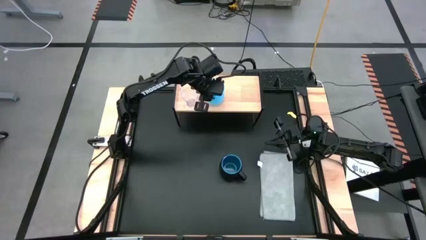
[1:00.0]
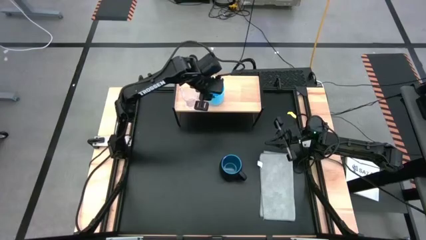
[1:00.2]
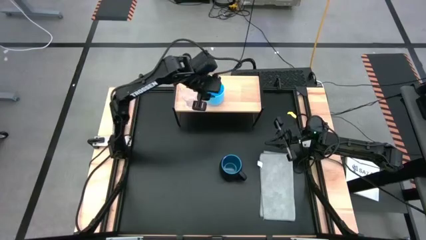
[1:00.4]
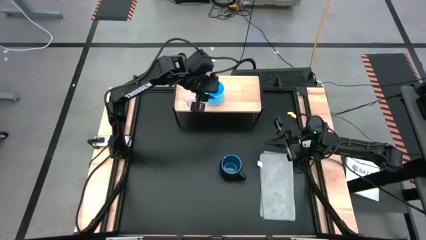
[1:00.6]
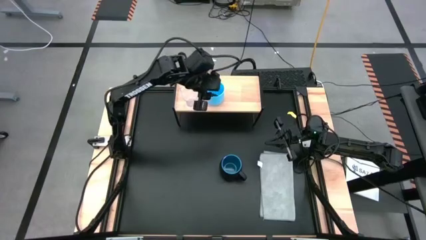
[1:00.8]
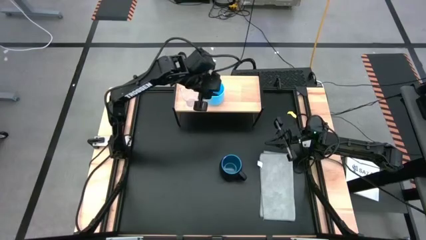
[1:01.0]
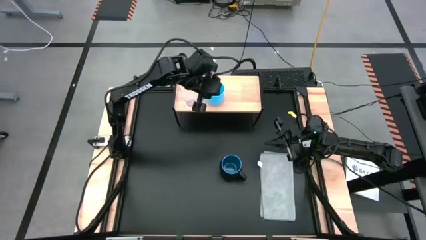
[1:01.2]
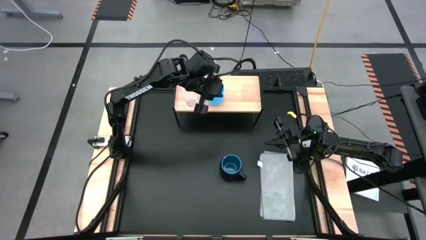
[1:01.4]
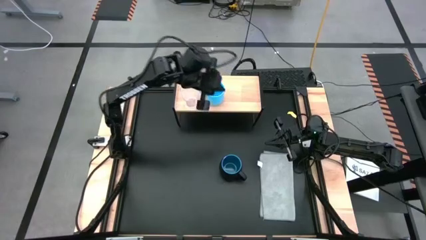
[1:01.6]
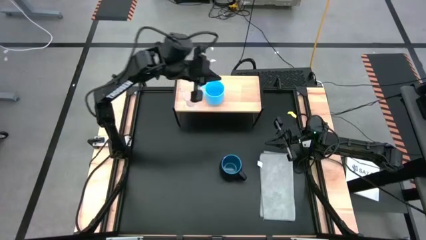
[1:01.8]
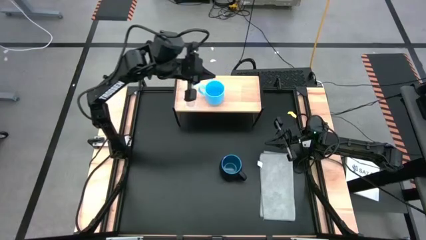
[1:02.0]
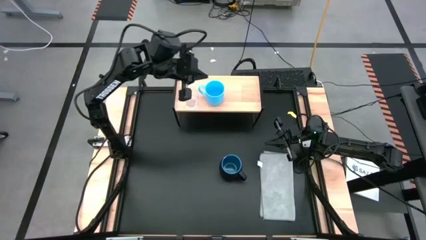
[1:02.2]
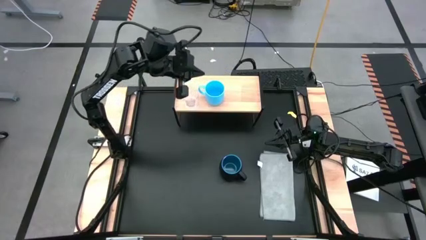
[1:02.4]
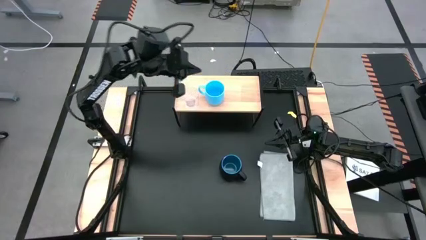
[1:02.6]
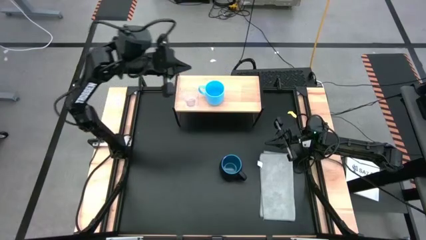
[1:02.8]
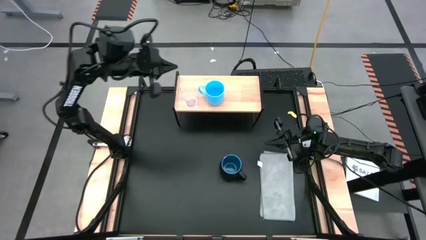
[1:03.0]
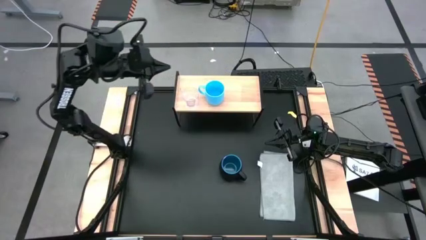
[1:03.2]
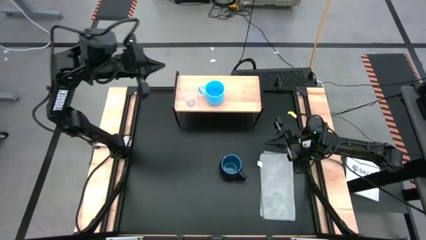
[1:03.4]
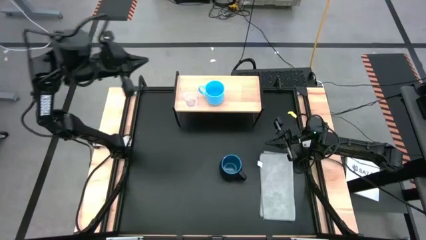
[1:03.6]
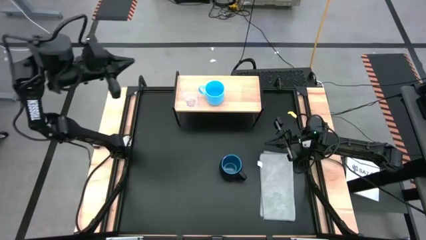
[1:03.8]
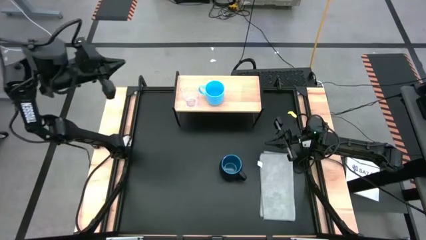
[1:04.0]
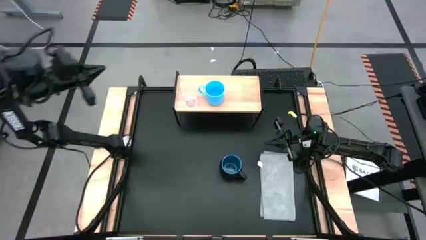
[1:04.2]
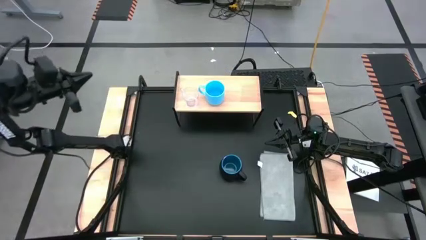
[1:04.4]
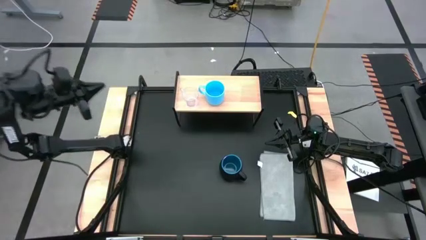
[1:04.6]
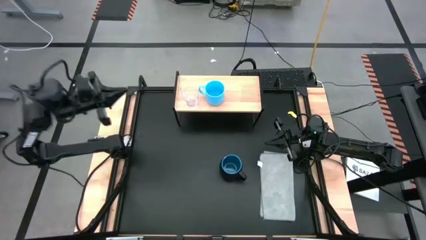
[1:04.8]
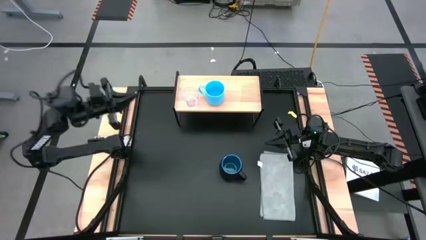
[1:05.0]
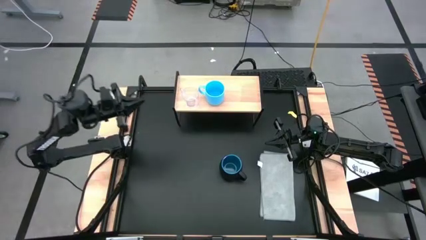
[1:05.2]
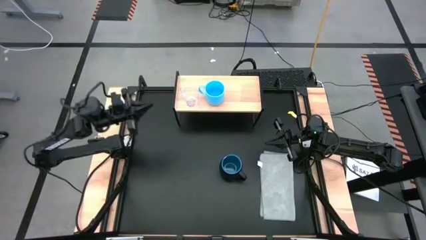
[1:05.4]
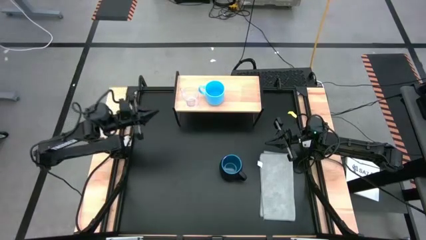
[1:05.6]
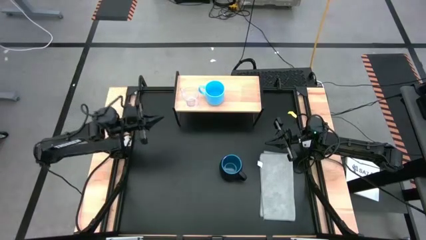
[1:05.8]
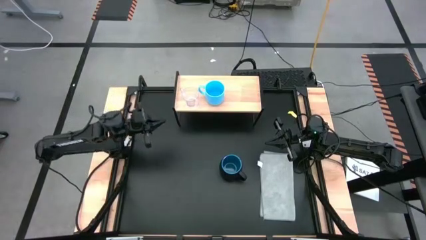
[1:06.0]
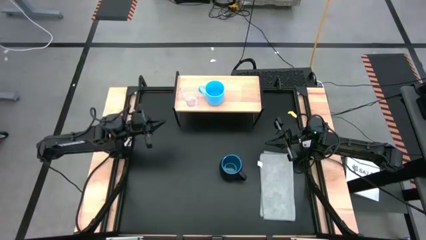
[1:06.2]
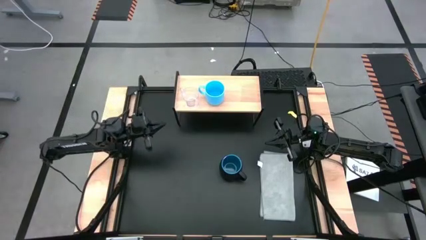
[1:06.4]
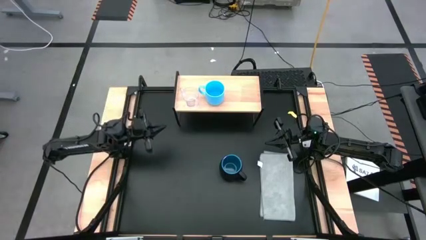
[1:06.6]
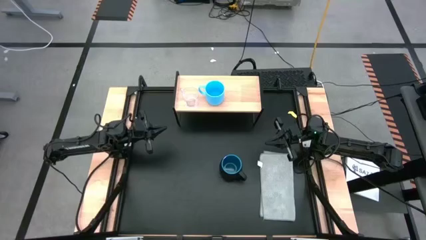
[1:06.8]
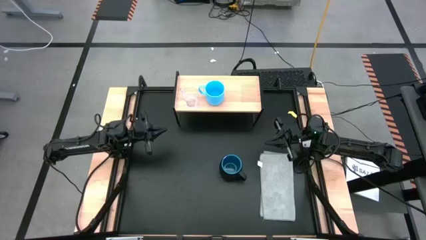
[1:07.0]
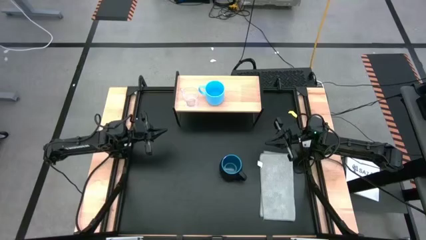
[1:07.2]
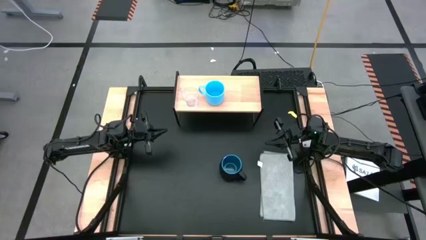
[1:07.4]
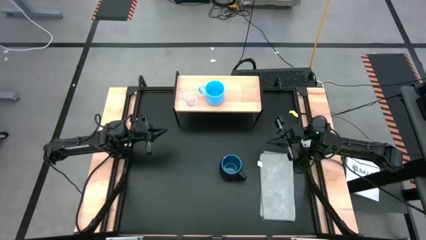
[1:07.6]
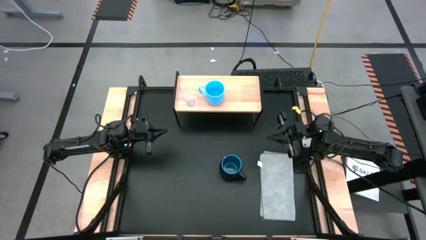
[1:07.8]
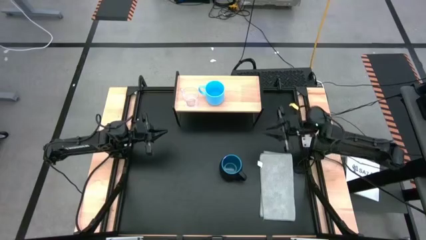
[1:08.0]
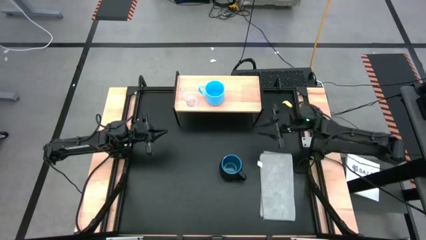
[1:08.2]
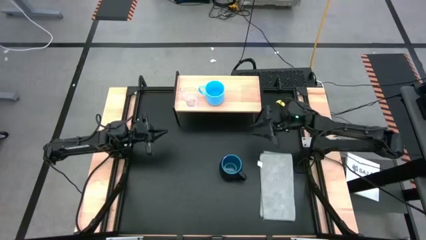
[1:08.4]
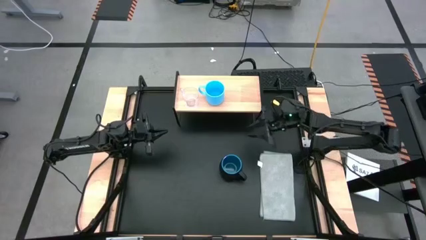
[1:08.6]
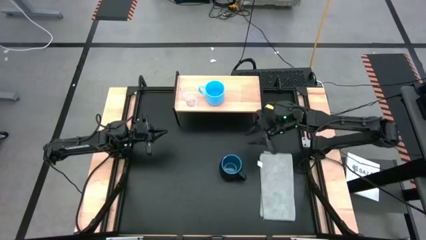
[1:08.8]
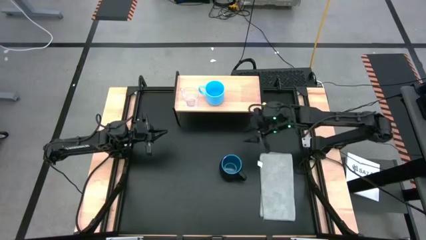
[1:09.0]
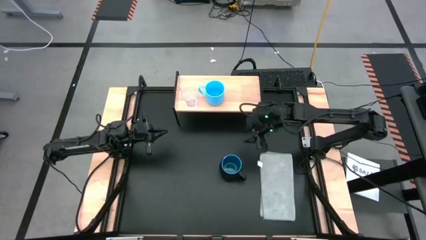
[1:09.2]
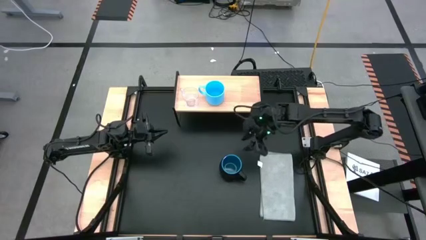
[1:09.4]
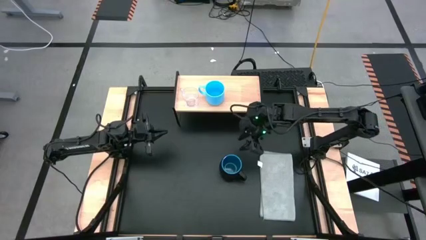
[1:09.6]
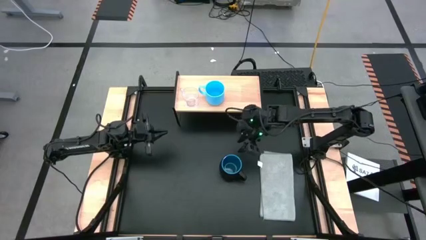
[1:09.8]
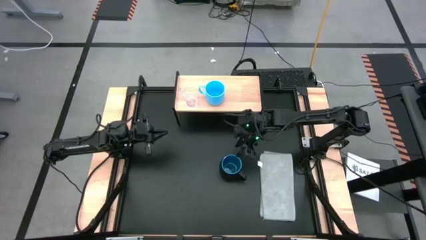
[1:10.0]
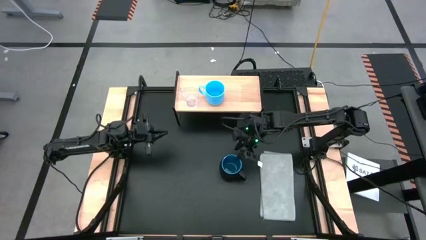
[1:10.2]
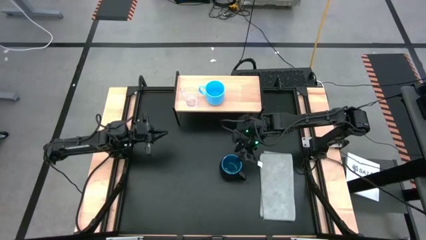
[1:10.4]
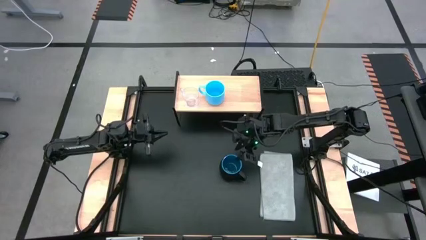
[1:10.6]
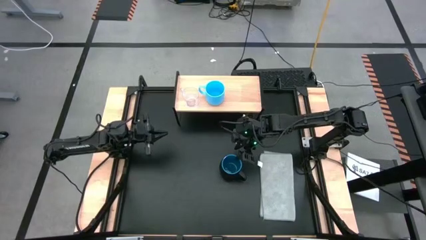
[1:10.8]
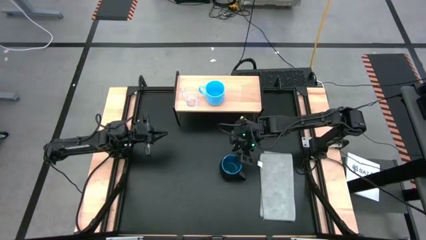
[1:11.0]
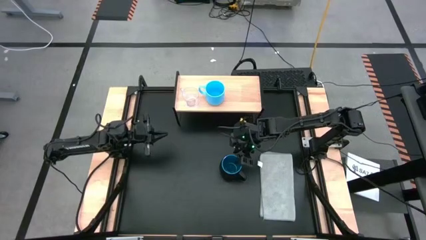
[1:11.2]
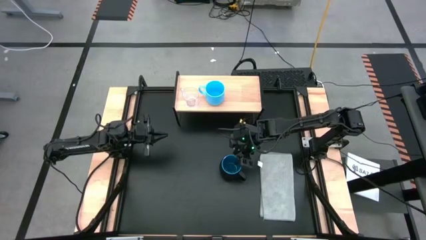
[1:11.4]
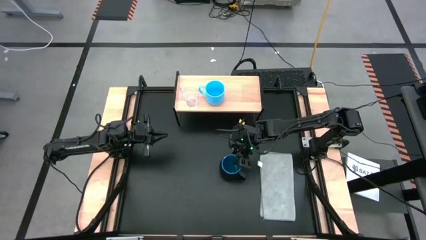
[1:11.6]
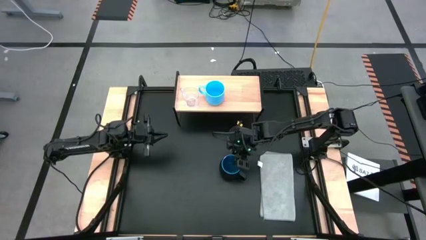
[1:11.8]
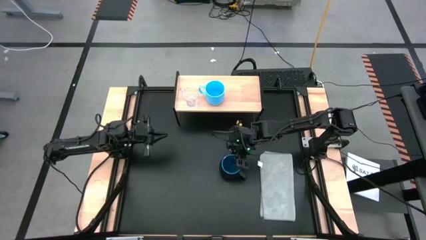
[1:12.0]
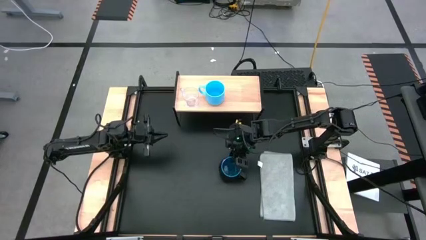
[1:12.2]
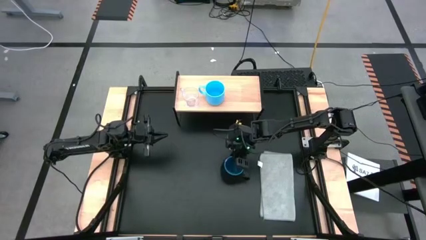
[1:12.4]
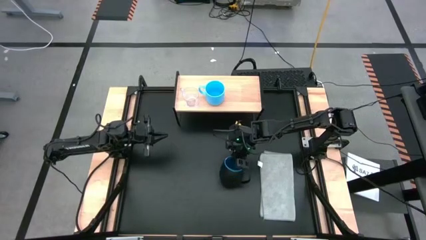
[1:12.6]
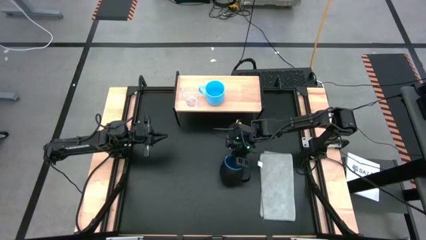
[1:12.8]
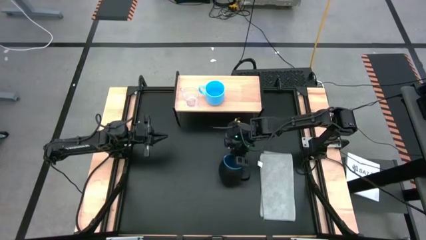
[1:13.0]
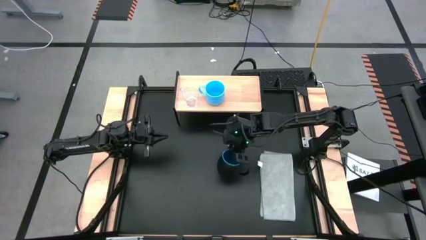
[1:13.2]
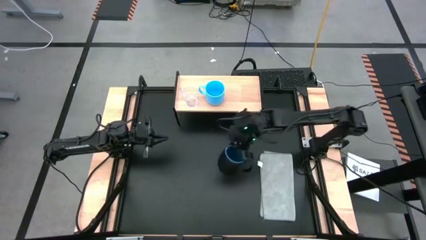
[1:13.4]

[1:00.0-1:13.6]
Task: Stack small to large cups/mugs on shelf
Put the black mug on the shelf
